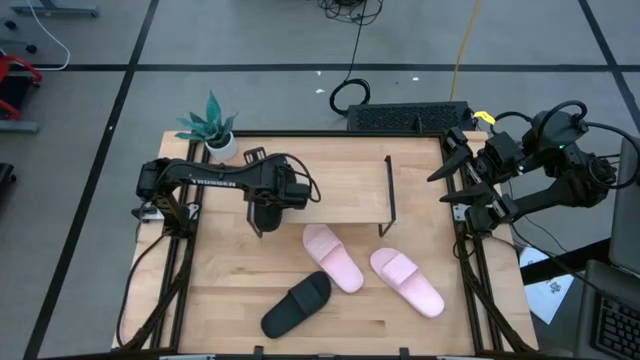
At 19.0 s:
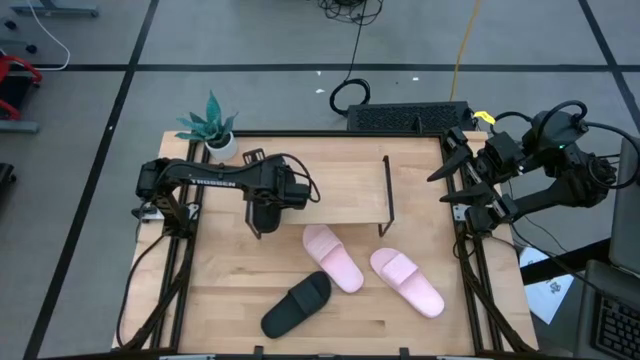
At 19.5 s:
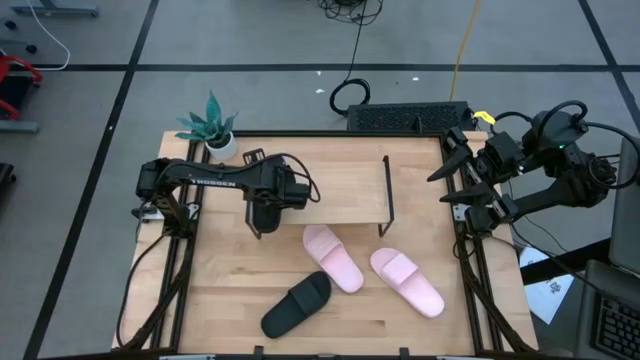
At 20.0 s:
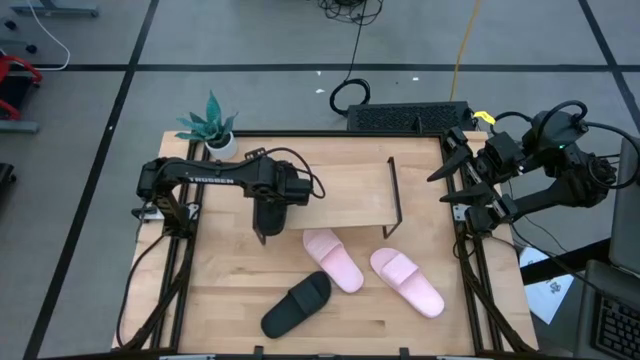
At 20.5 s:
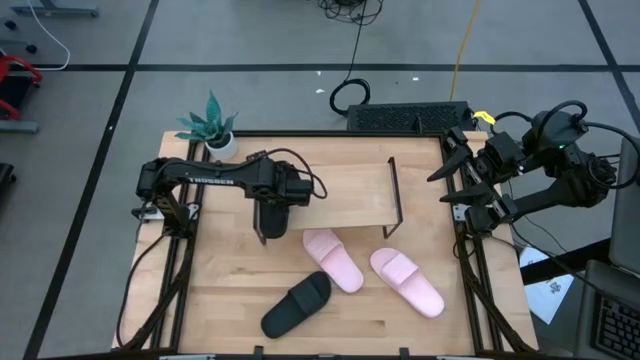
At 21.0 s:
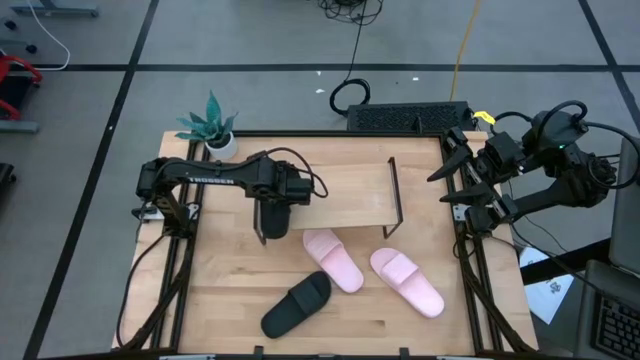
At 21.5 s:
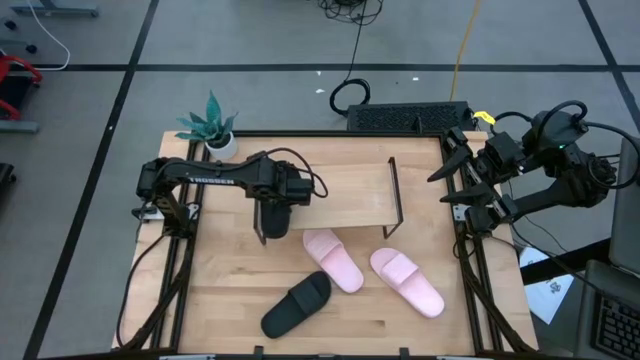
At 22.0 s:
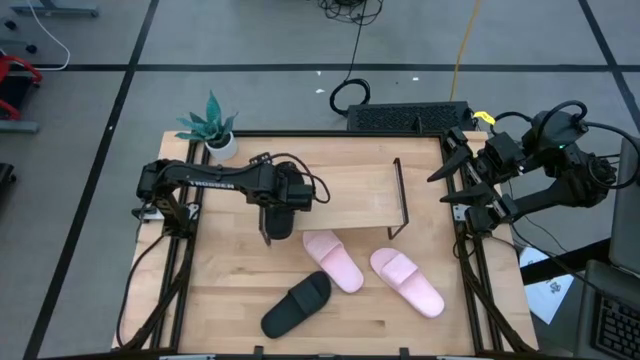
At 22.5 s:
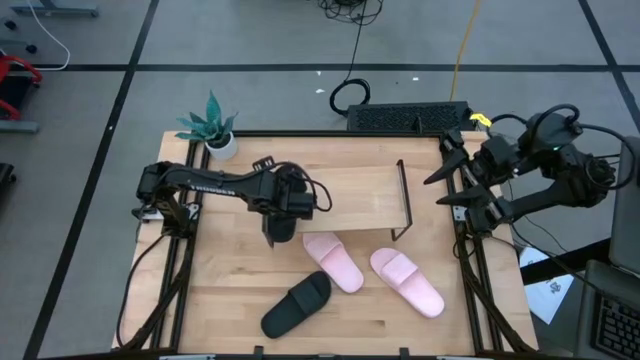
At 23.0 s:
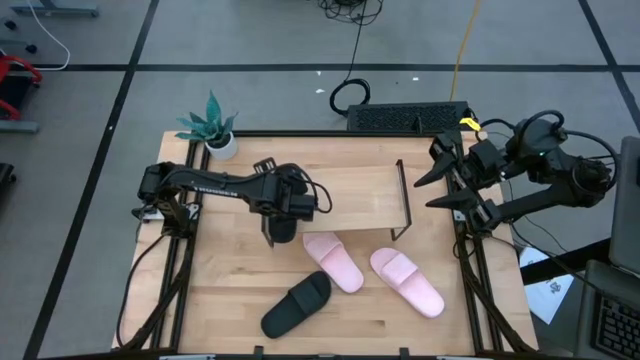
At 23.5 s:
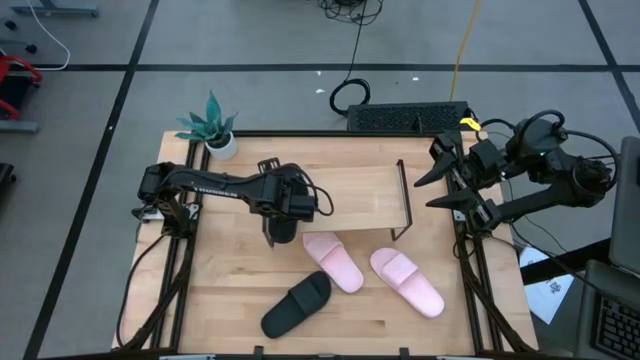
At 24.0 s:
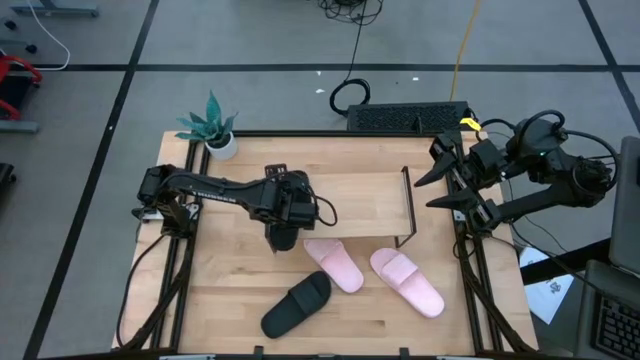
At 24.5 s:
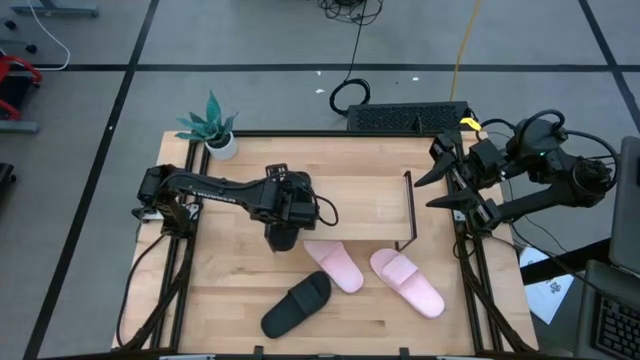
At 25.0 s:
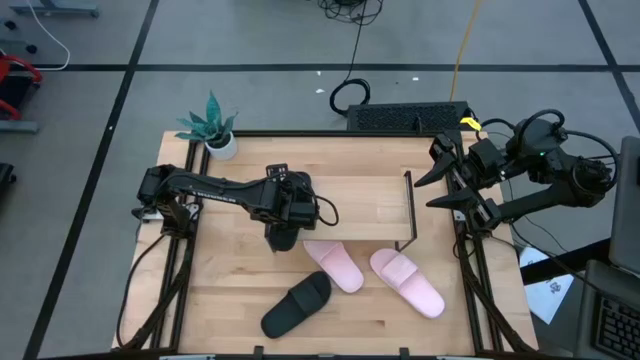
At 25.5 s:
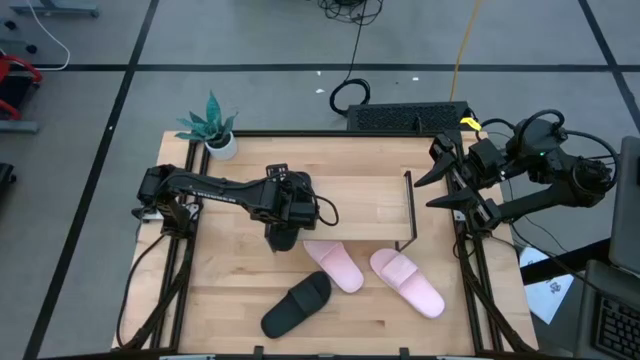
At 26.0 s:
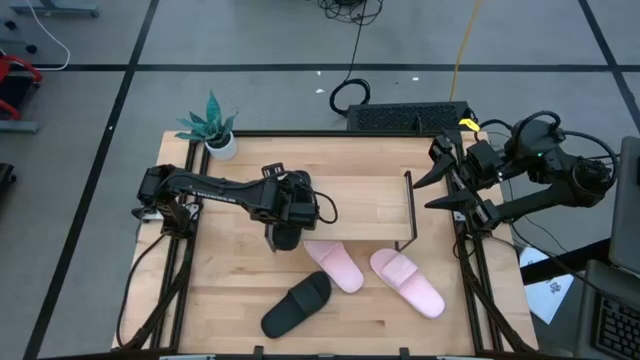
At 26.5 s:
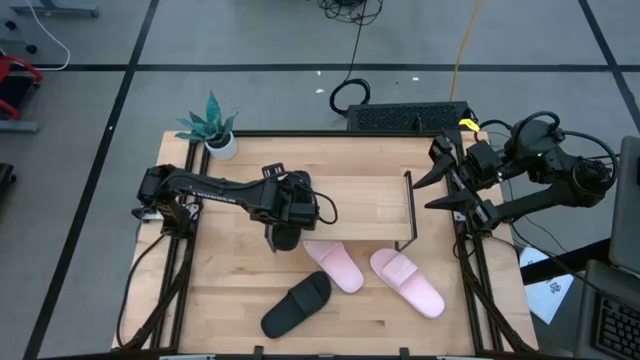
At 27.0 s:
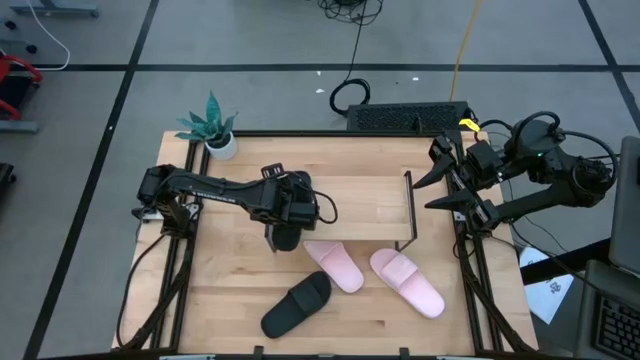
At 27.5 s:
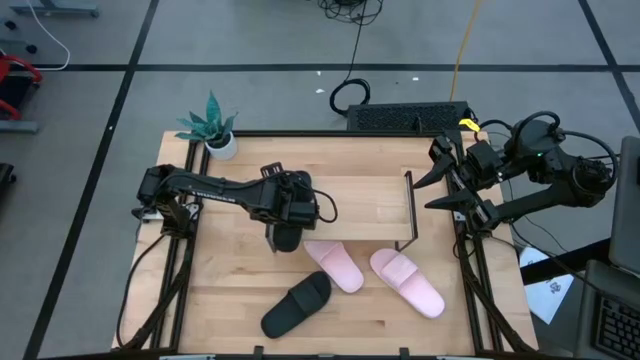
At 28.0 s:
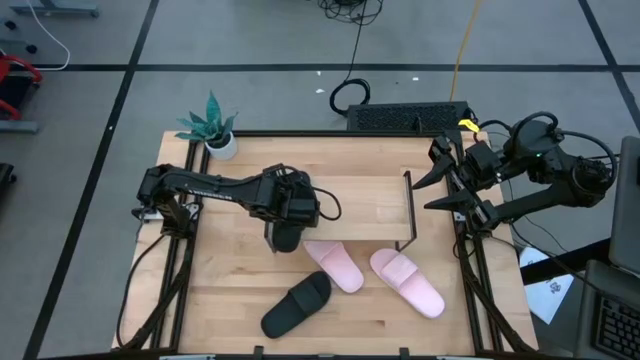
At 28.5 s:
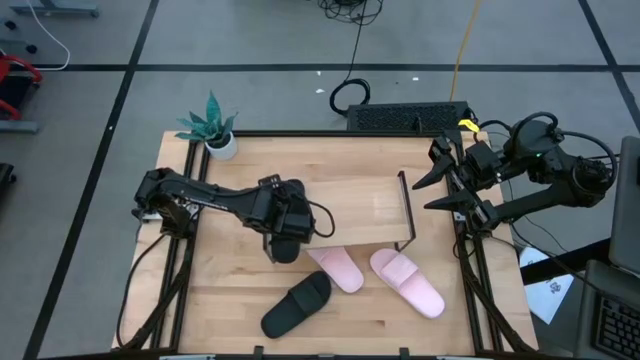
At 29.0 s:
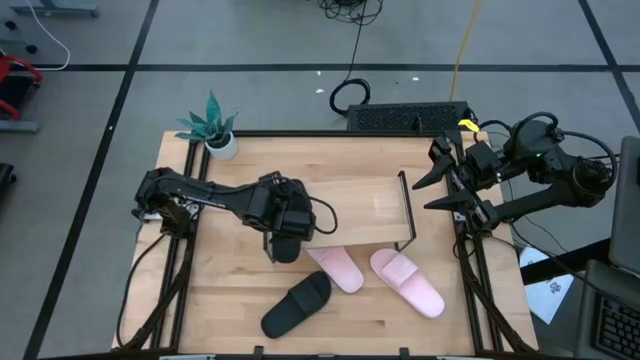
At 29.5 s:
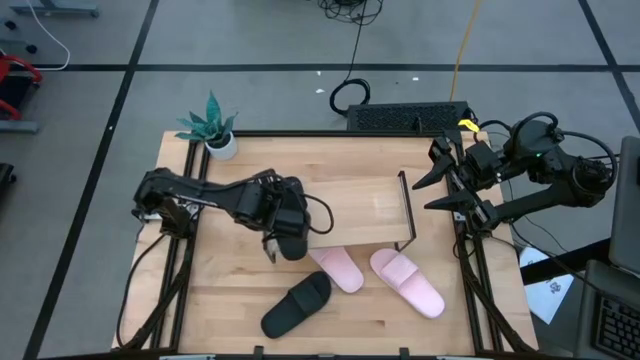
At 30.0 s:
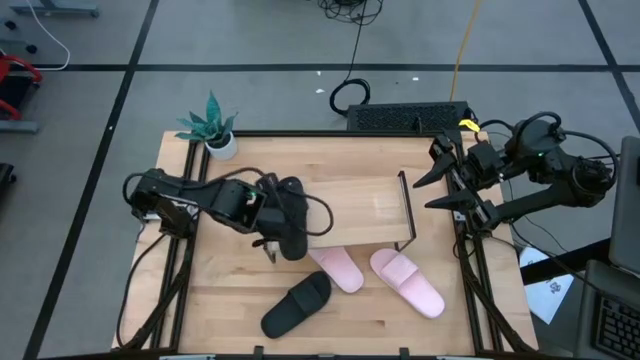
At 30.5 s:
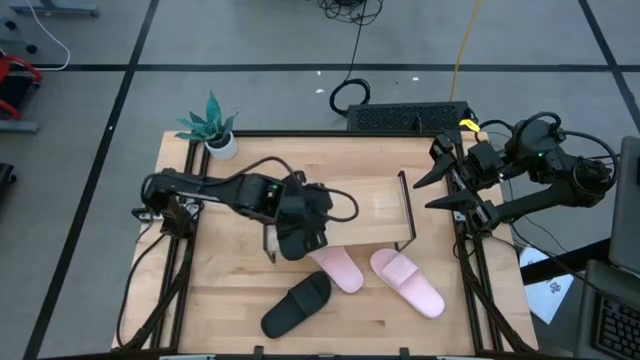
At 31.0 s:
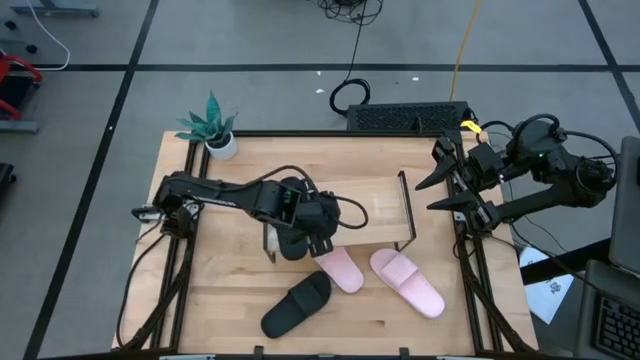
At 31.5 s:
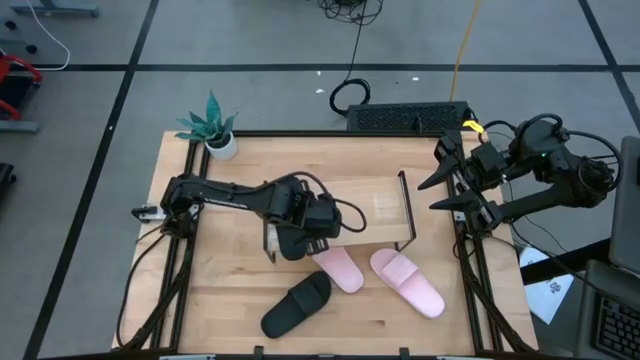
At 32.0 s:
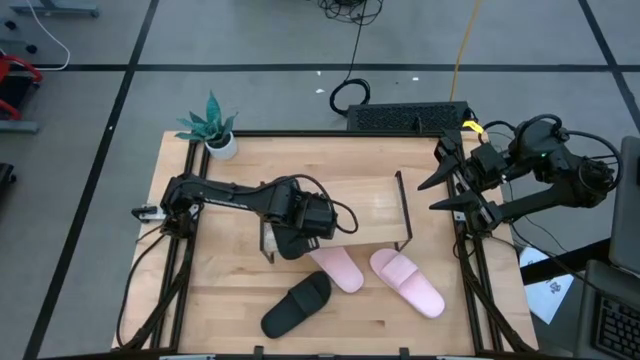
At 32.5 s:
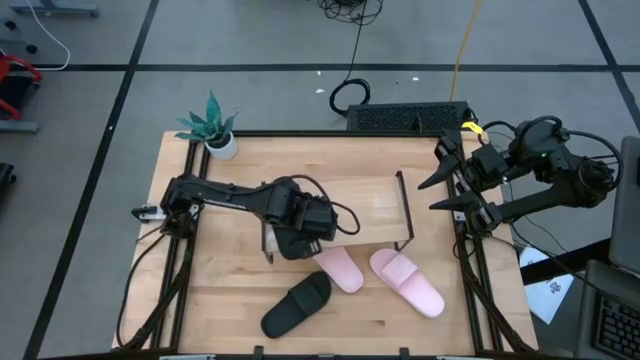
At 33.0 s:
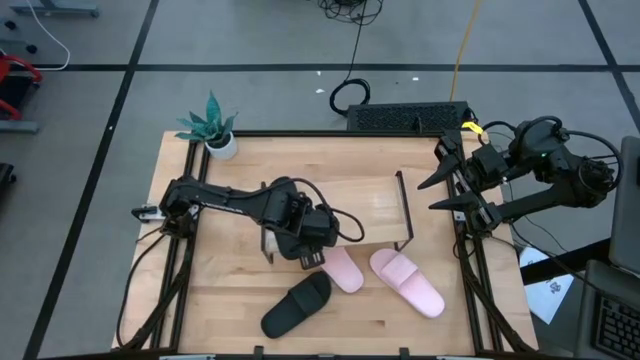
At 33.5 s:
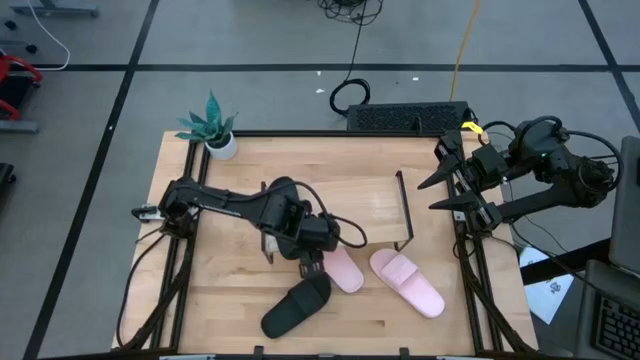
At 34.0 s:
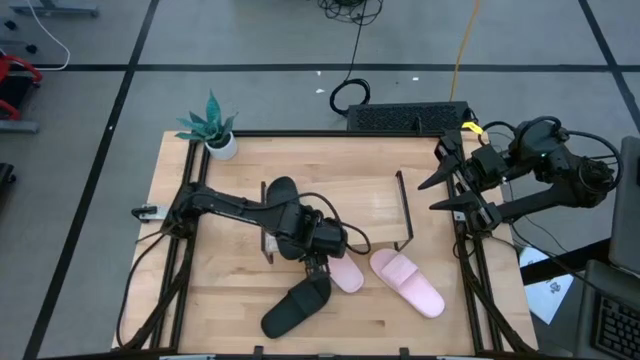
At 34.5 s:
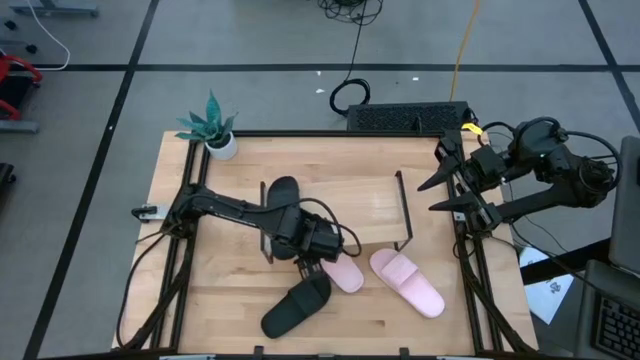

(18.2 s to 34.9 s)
Task: Pick and place slides into the shelf
Put the left black slipper on the shelf

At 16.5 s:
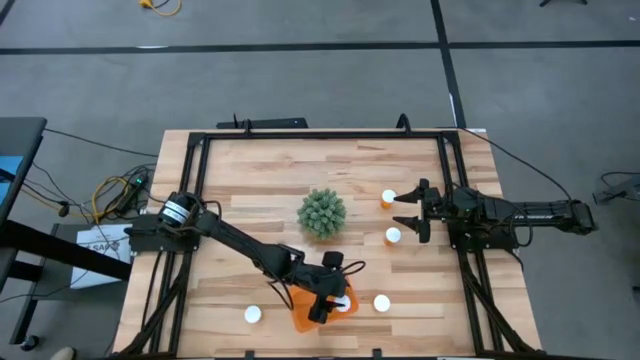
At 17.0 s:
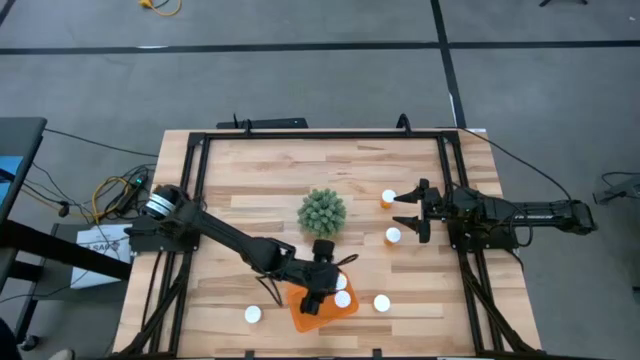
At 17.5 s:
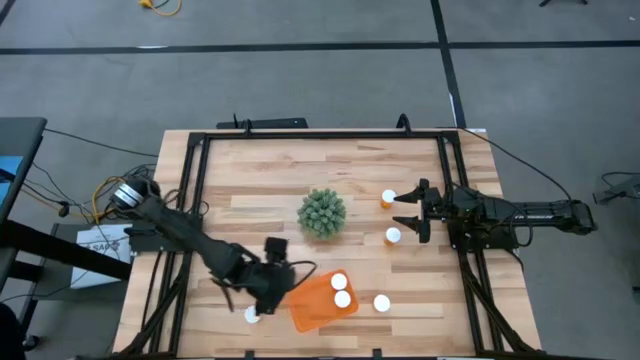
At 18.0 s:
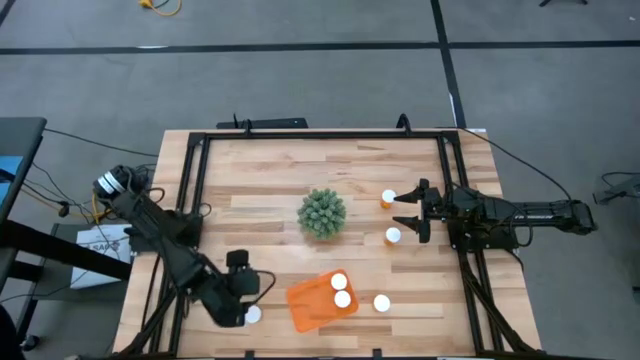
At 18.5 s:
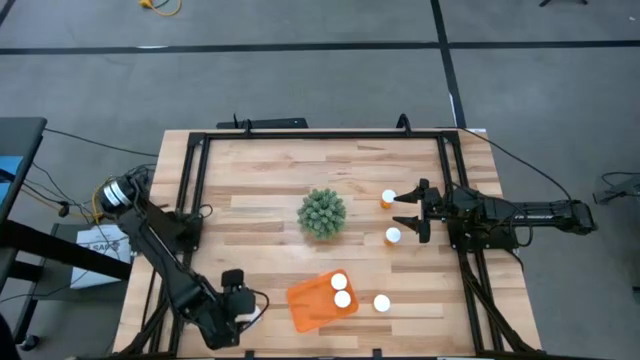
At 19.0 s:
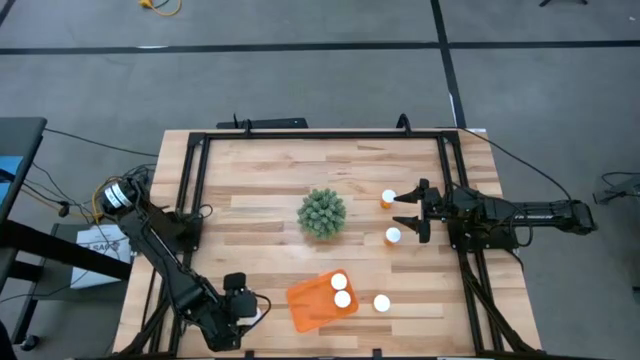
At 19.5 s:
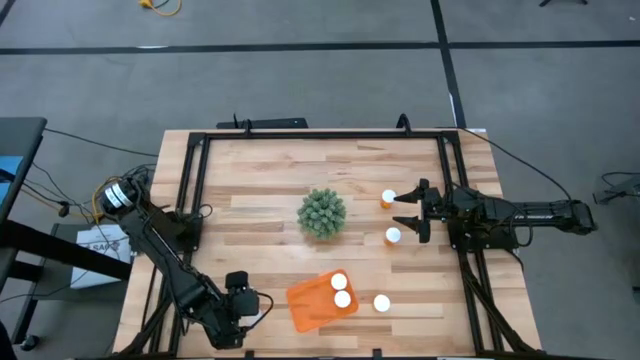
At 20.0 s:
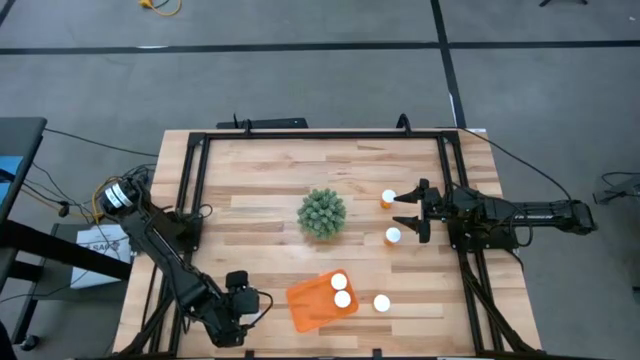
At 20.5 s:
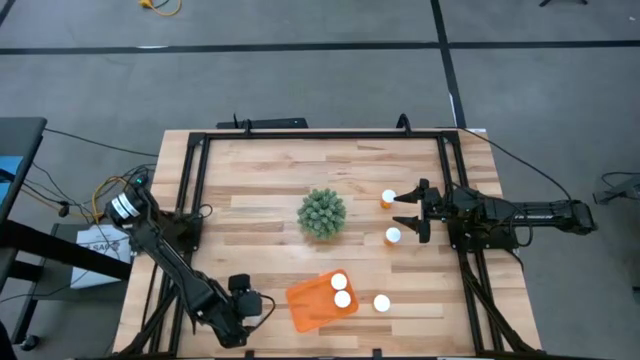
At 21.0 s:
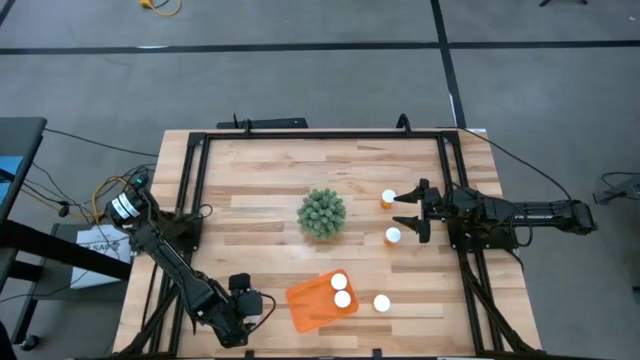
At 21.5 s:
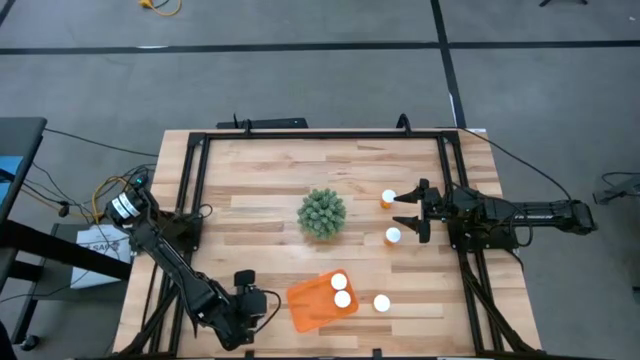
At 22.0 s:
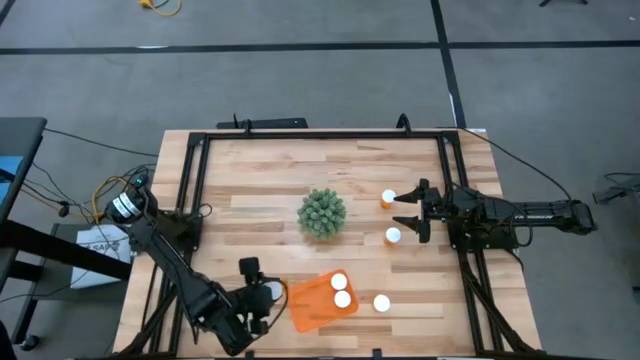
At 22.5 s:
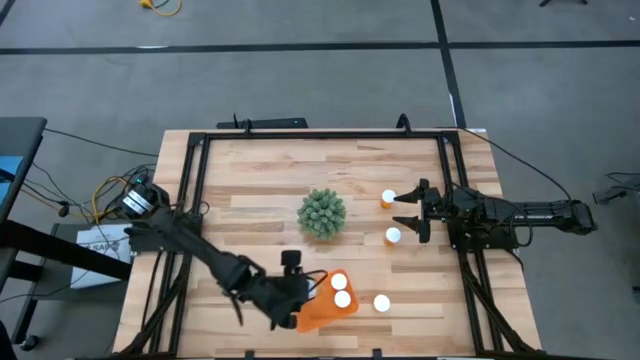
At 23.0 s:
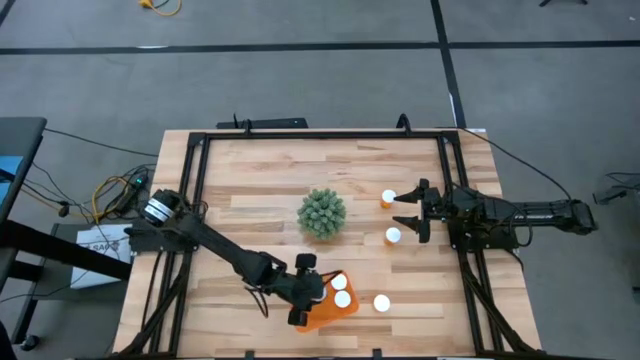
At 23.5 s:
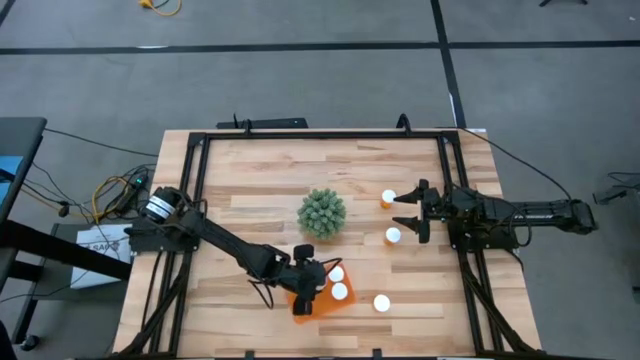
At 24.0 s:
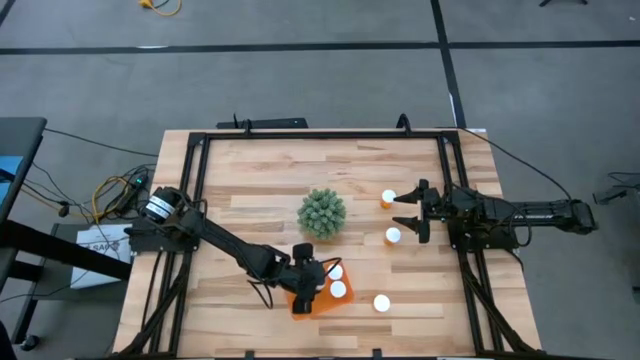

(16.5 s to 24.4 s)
Task: Pick and place pill bottles into a basket
Put the orange pill bottle into the orange bin
